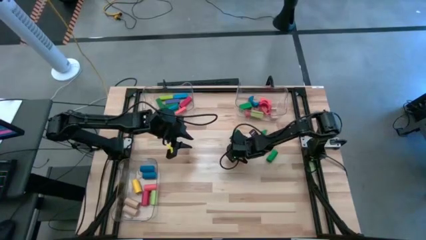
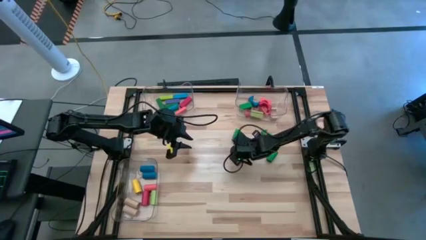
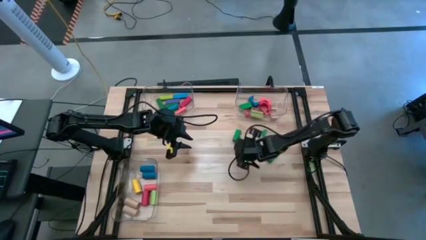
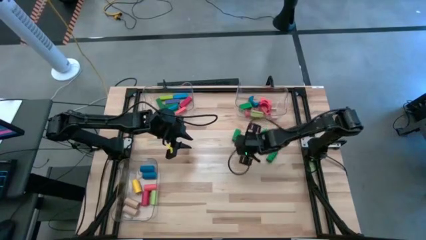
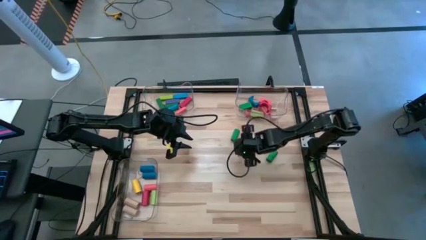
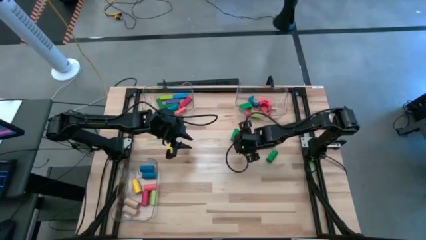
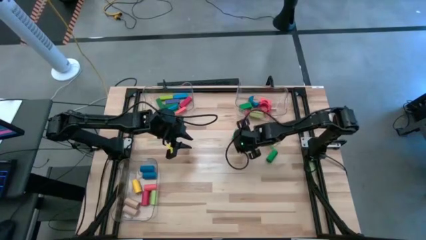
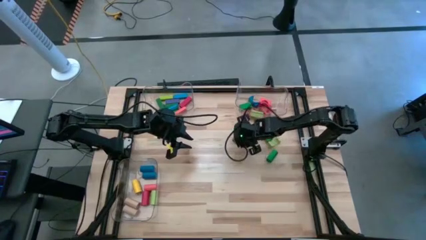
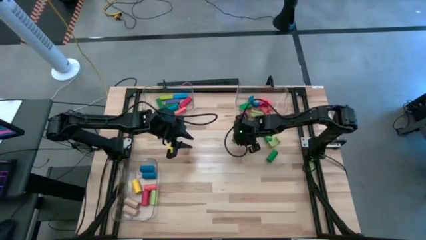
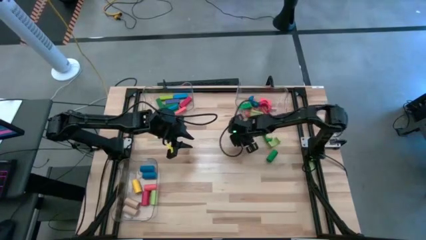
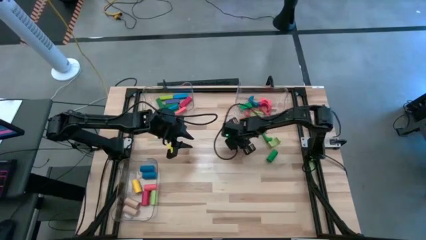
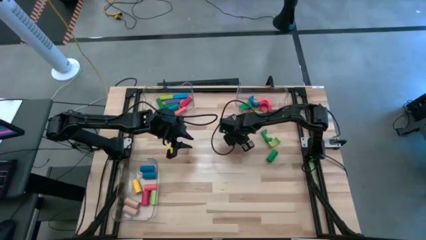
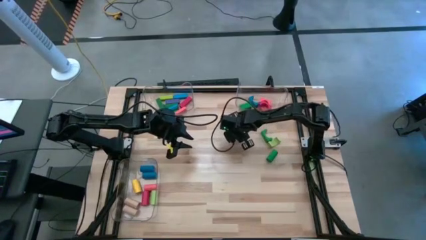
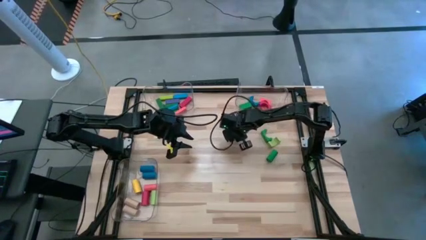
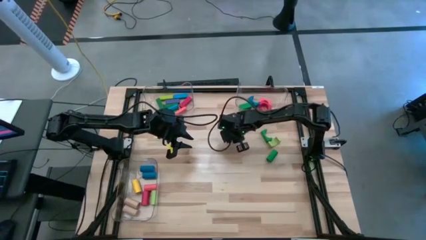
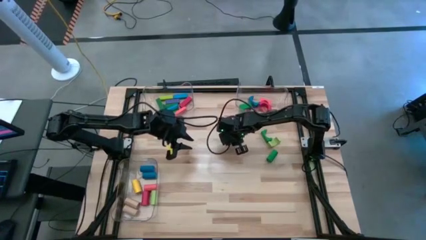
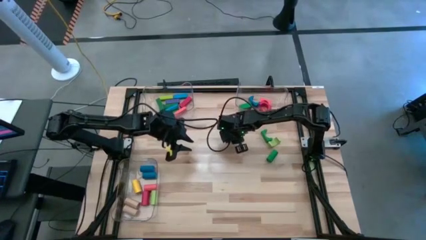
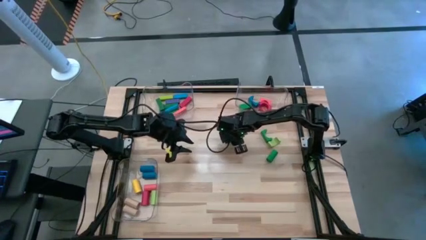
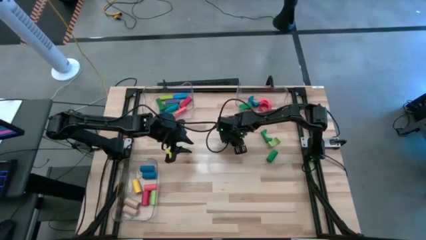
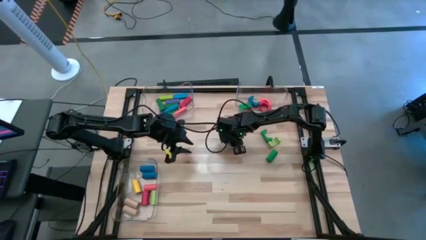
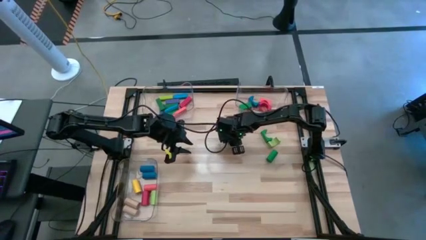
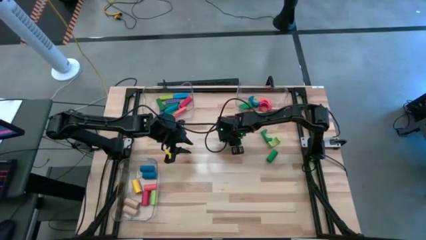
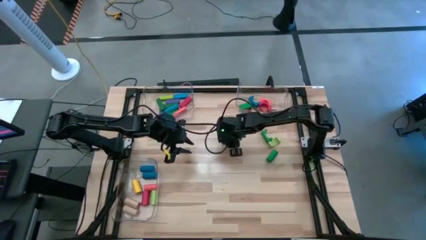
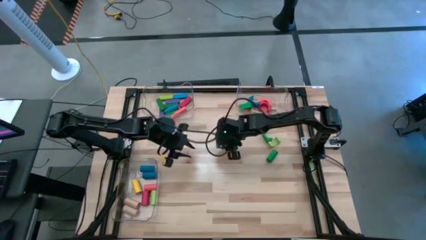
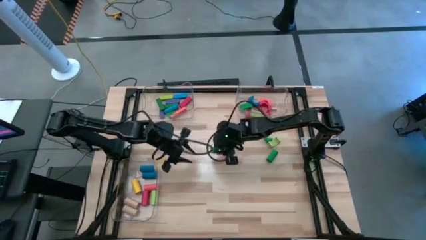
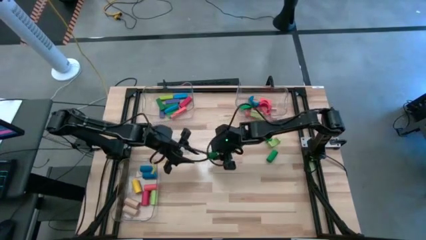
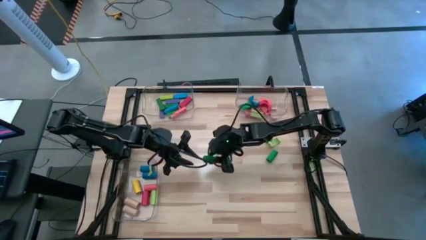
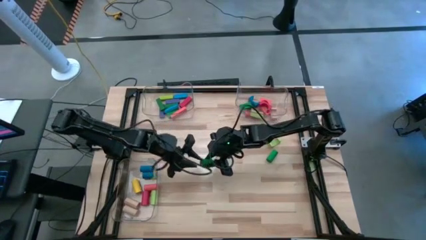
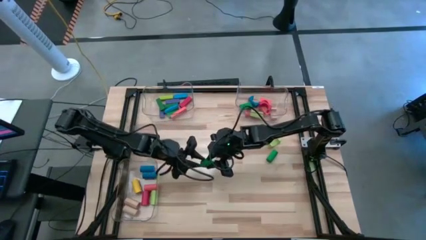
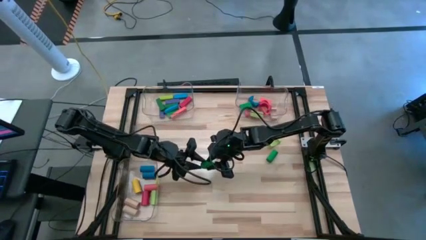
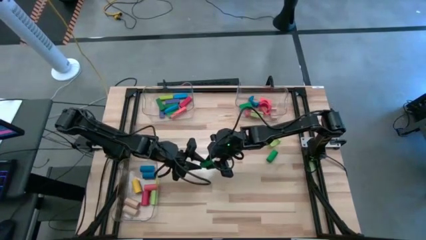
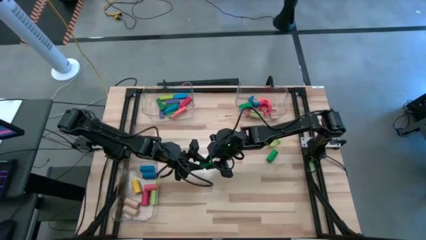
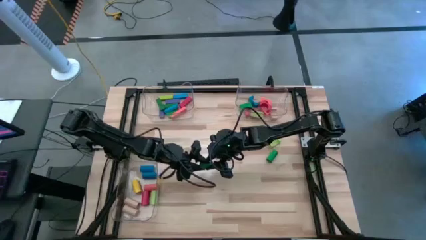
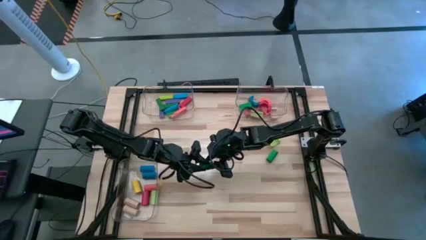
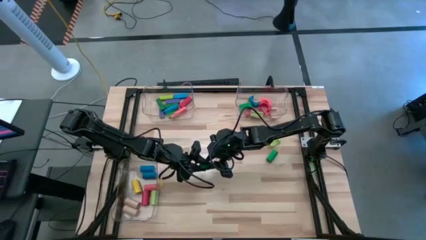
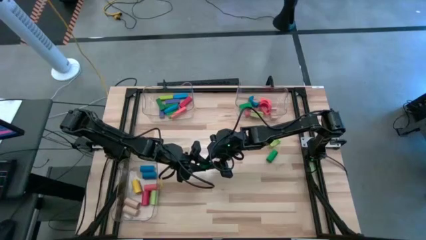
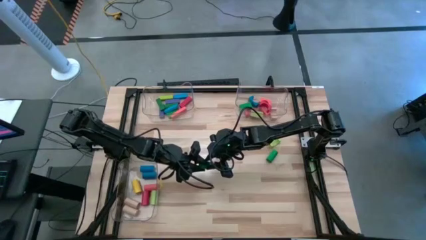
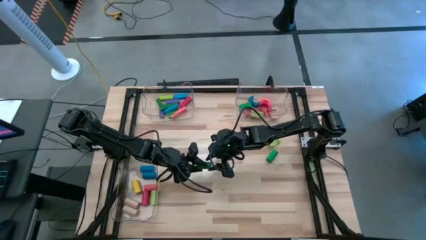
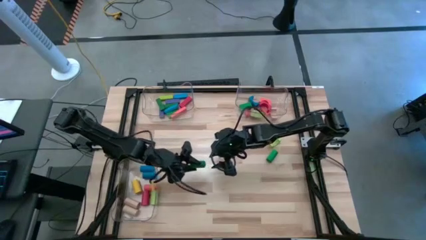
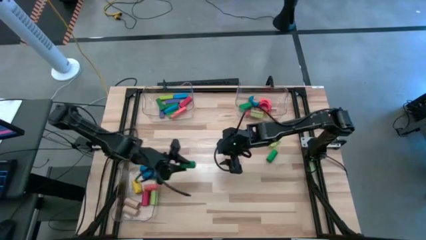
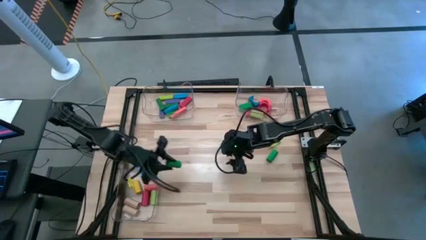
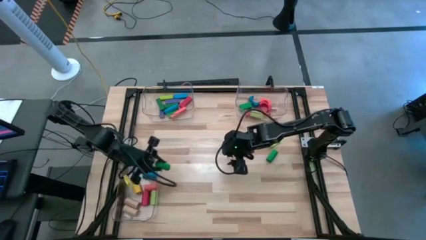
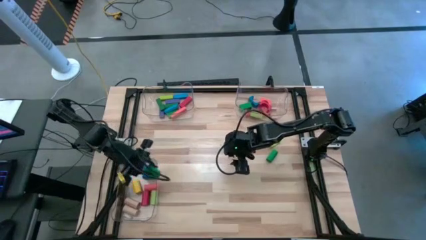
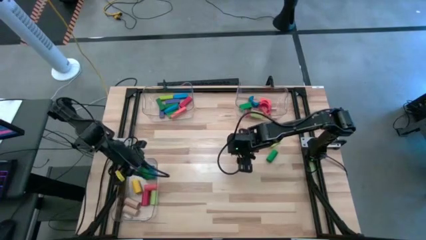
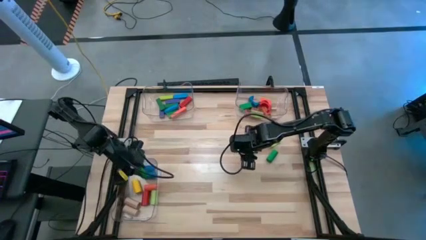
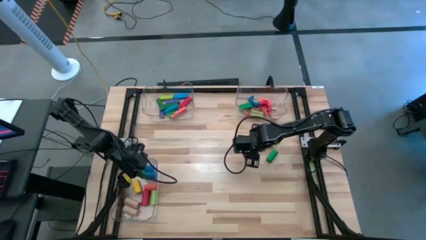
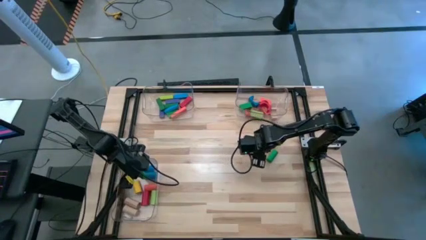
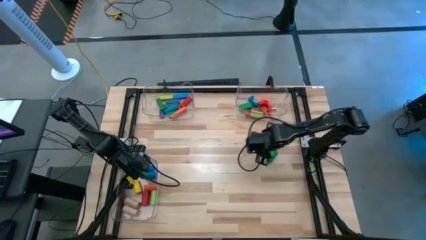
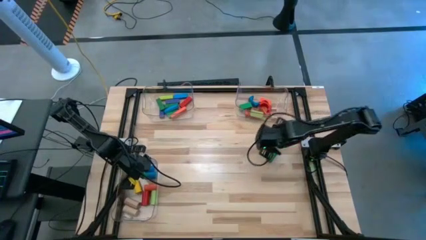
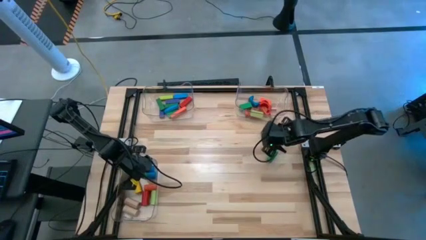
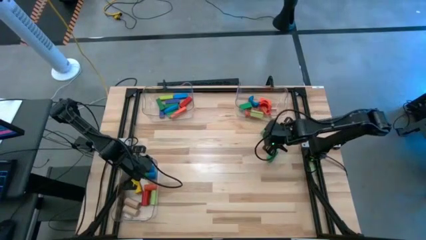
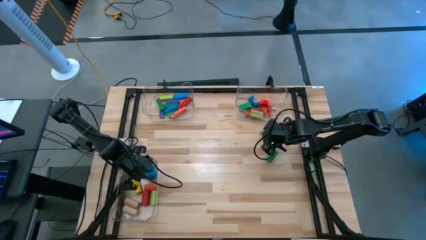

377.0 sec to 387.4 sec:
Task: Sort blocks by size
Put the green cylindrical block into the bottom left transparent bin

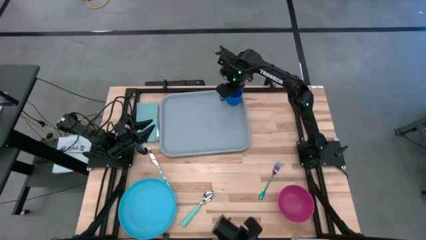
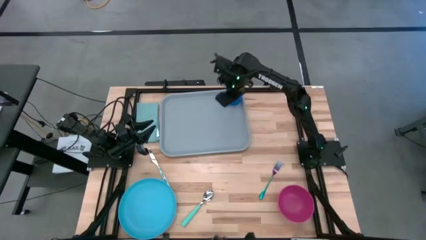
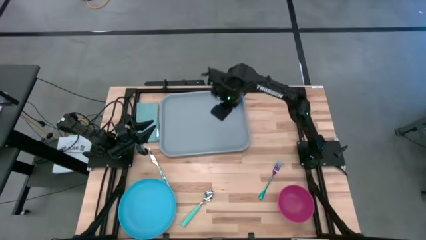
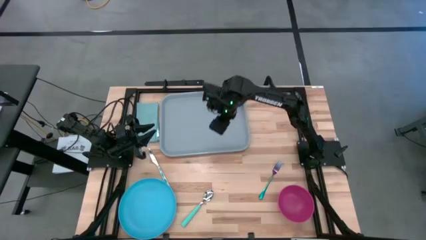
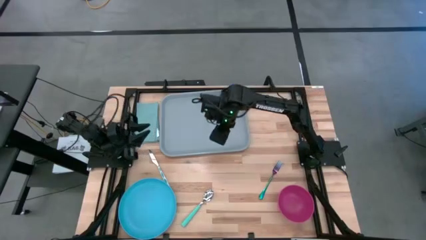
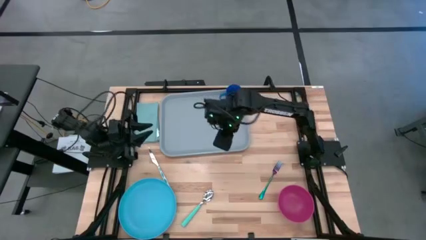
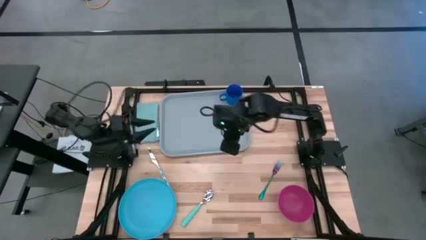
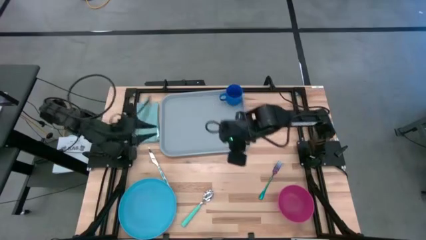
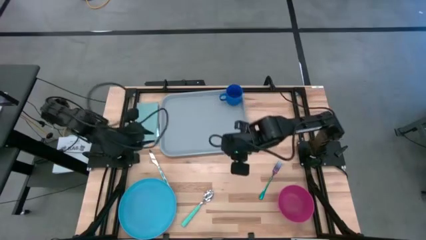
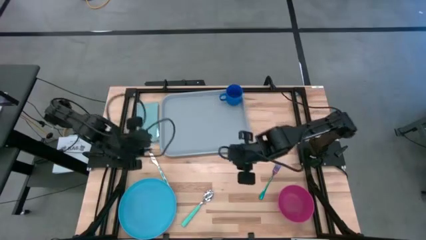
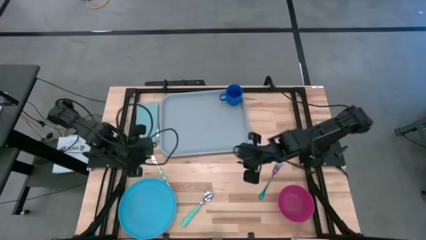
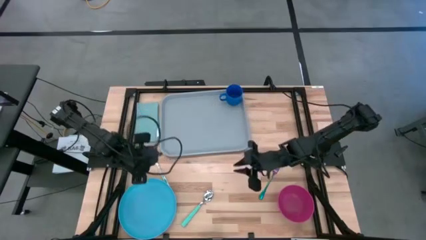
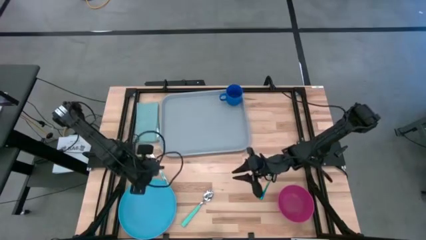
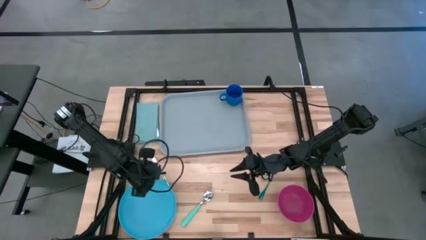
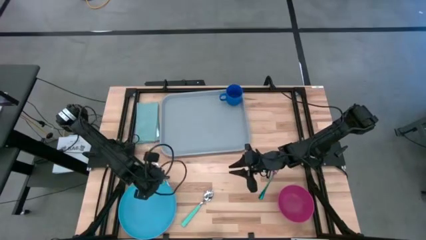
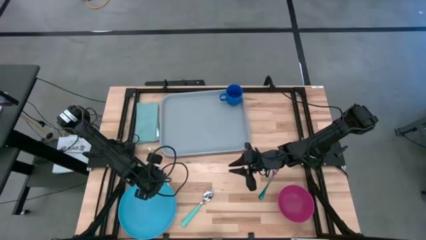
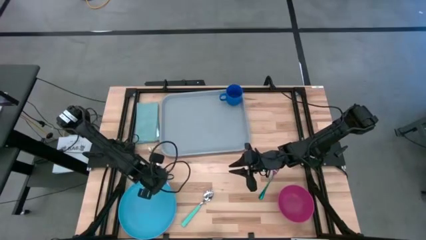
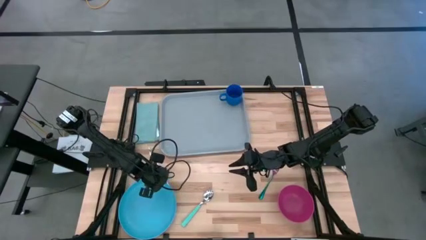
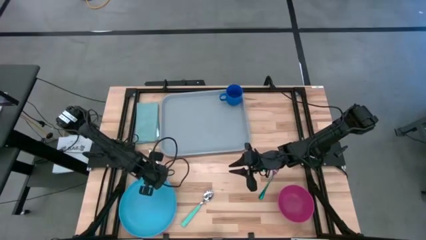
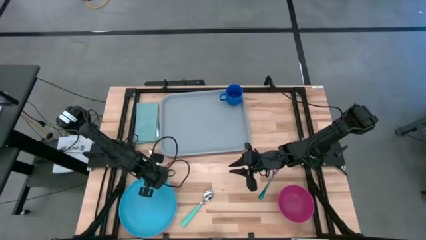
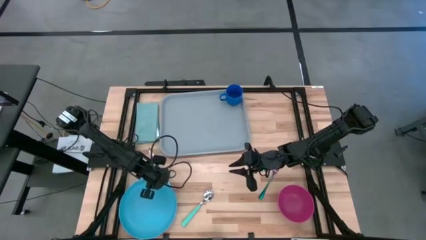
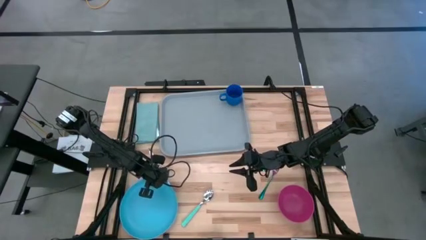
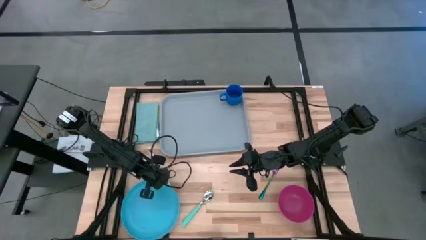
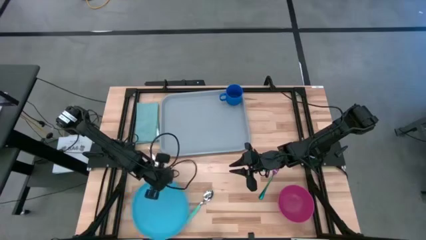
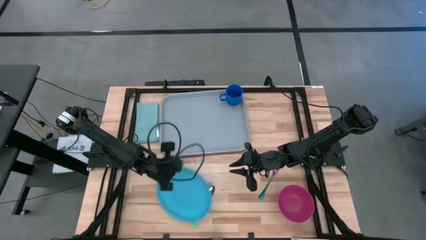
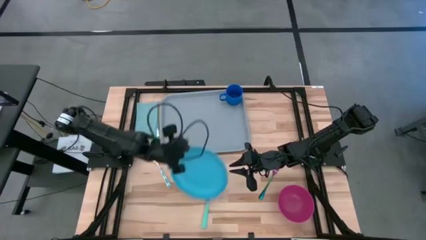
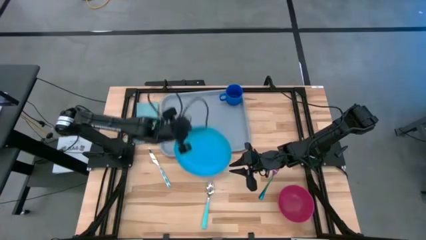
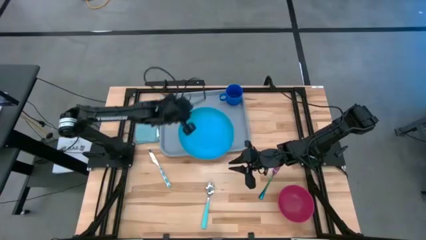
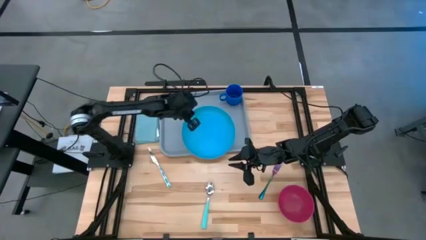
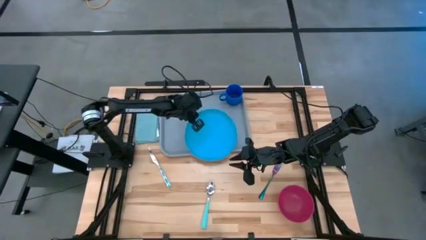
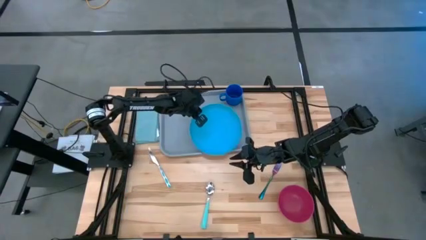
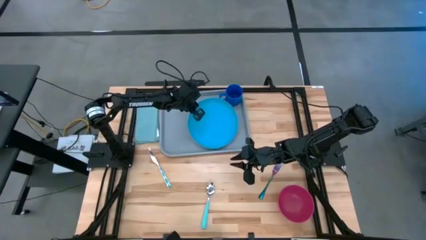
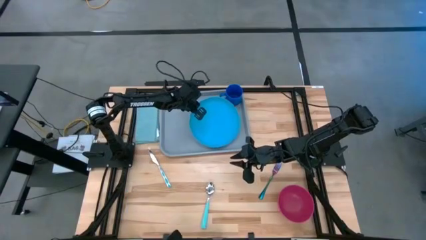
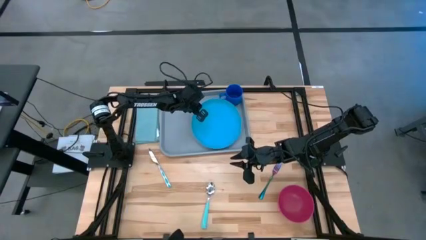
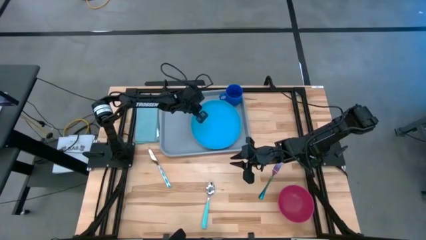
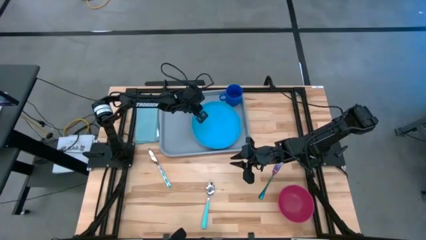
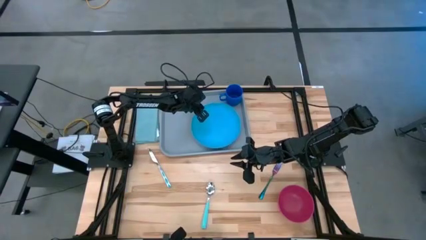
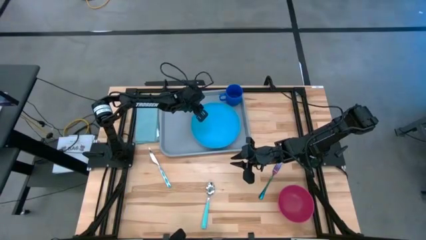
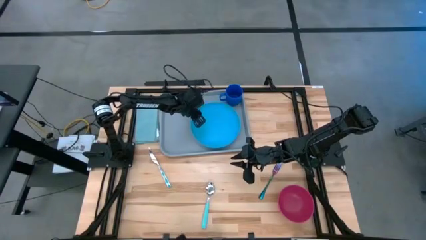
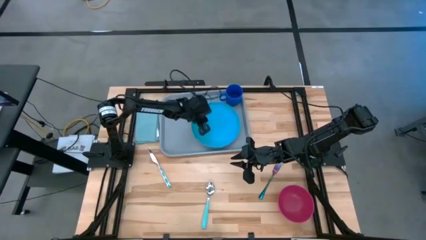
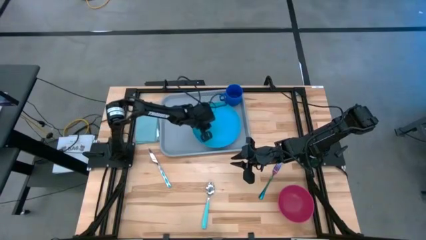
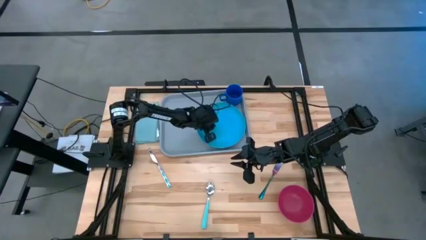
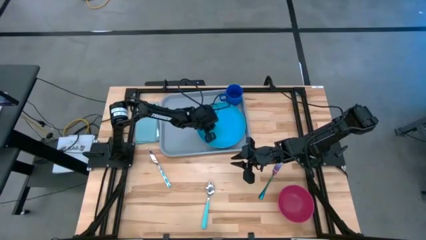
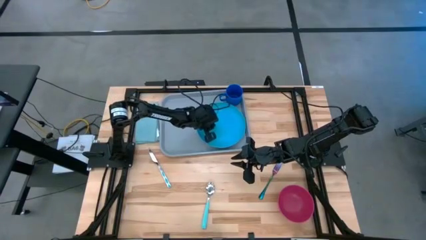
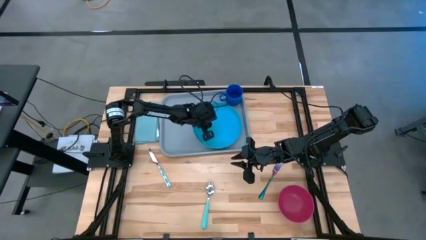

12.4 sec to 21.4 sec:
Task: Set up tray
Put the light blue plate on the gray tray
